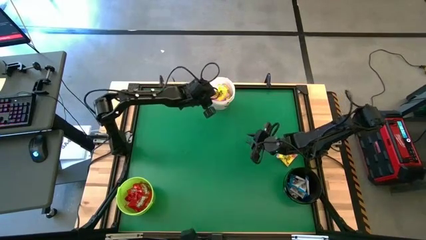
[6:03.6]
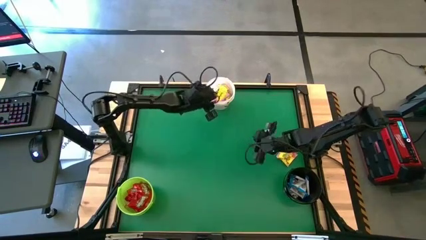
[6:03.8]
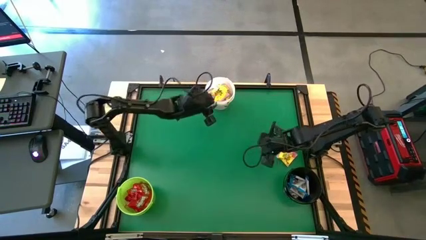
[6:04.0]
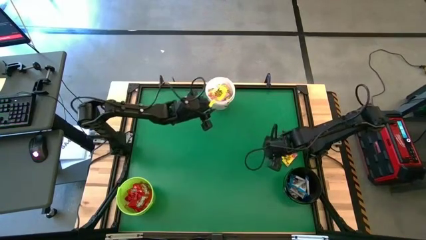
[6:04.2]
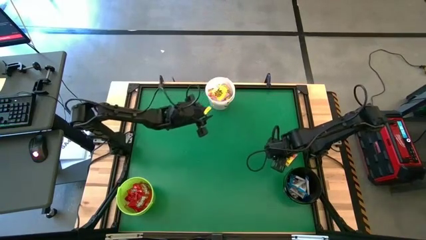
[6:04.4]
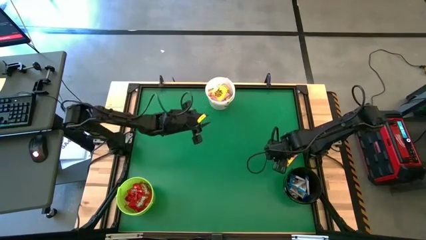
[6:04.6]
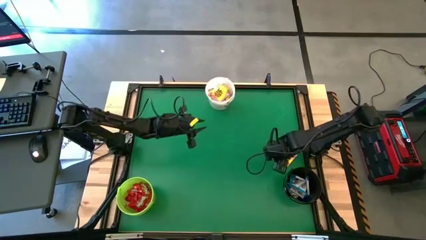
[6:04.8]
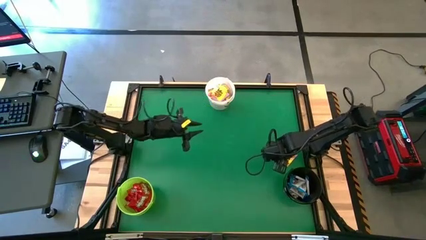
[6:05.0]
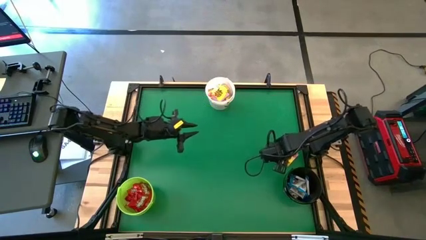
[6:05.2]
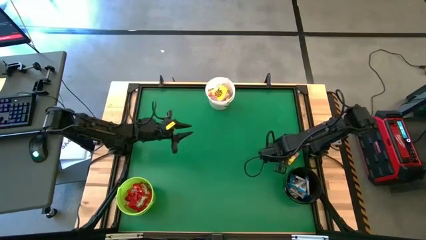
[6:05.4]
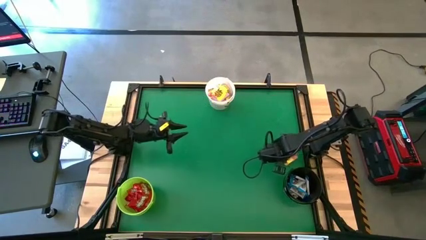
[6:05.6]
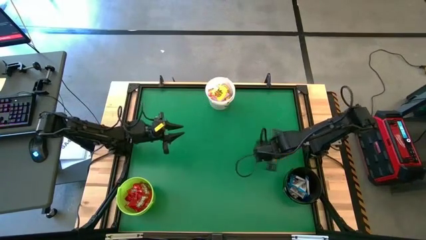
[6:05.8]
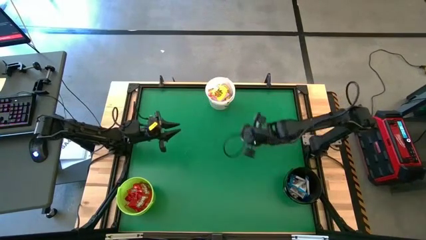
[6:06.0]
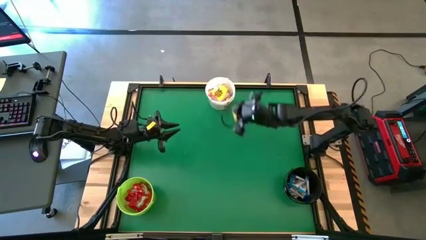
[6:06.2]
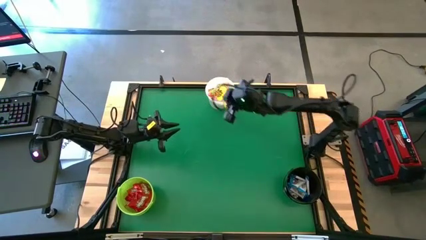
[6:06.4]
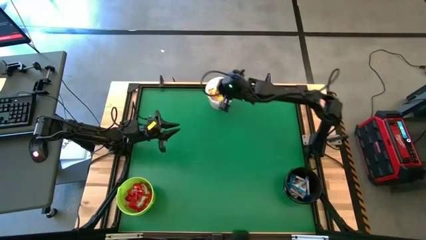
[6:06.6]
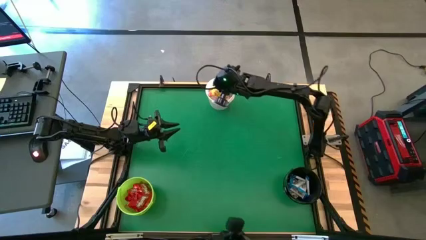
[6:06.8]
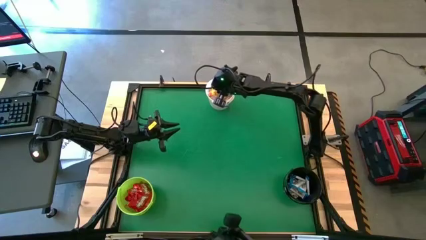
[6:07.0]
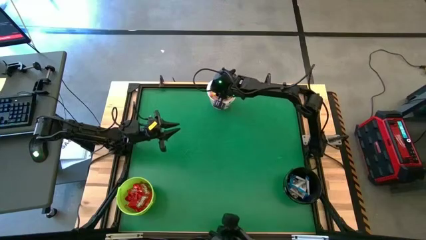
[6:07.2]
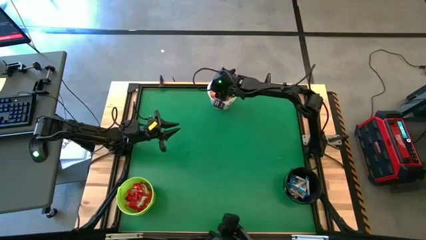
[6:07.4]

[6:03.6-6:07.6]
Task: Sort candy by brand, put in halloween buckets
Put the yellow candy into the white bucket

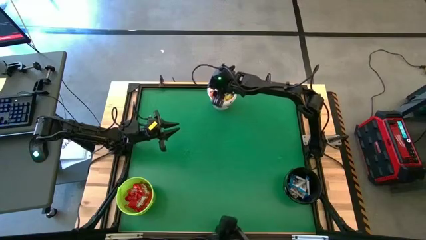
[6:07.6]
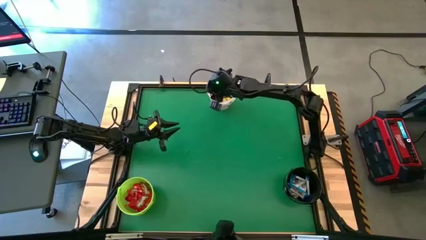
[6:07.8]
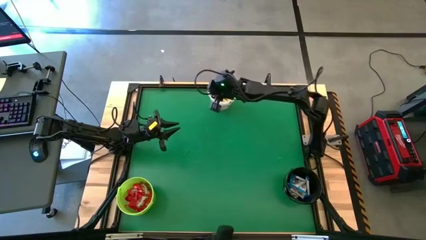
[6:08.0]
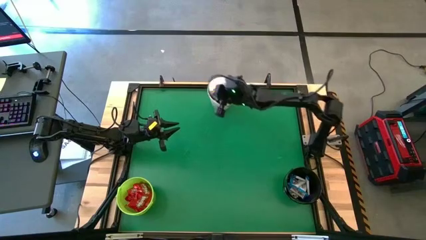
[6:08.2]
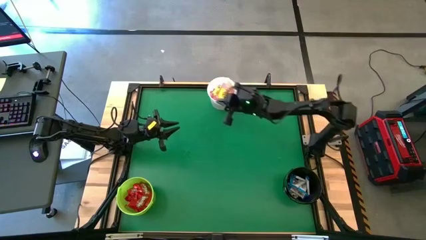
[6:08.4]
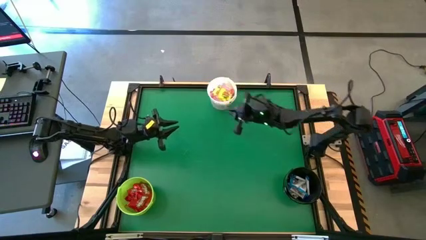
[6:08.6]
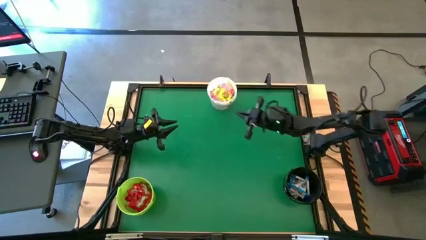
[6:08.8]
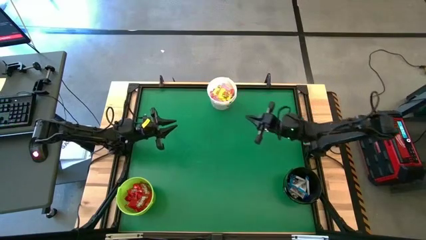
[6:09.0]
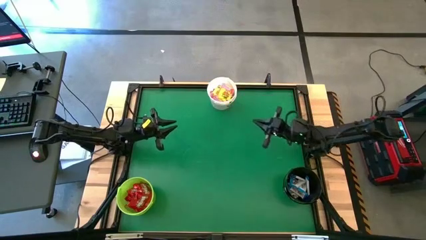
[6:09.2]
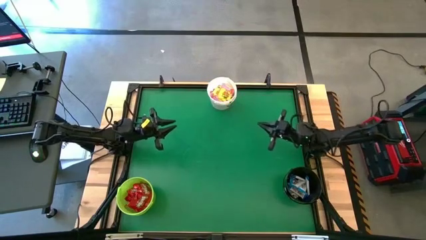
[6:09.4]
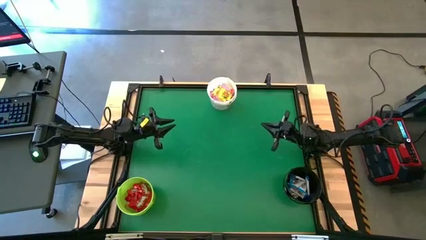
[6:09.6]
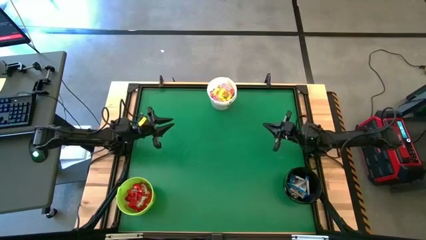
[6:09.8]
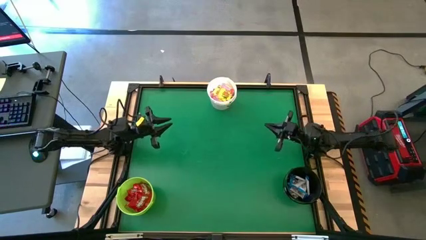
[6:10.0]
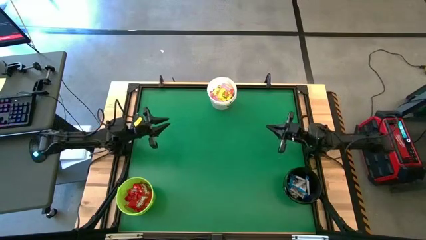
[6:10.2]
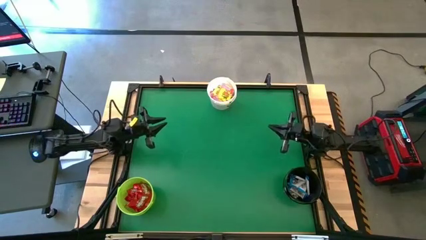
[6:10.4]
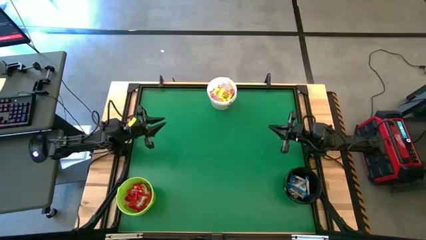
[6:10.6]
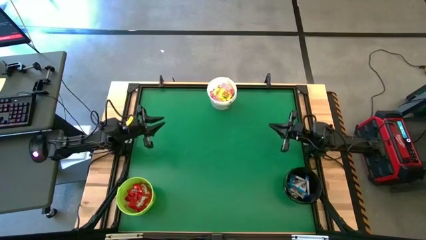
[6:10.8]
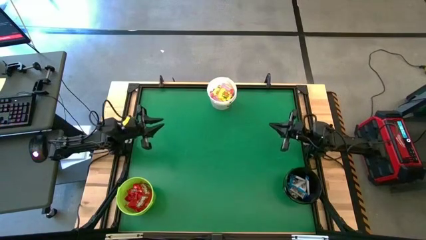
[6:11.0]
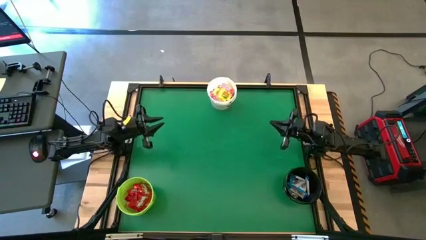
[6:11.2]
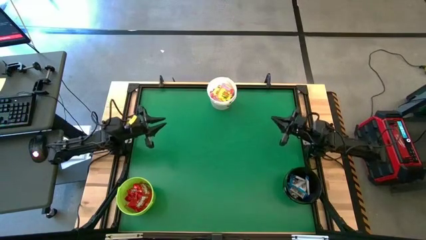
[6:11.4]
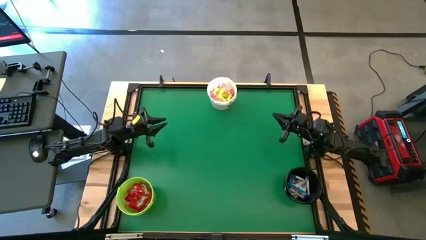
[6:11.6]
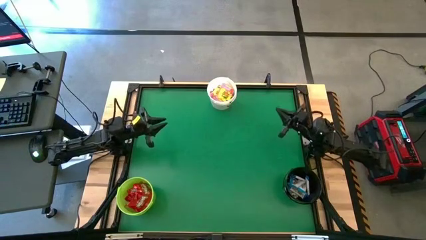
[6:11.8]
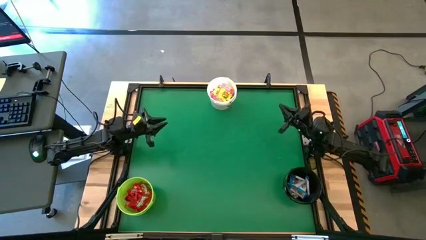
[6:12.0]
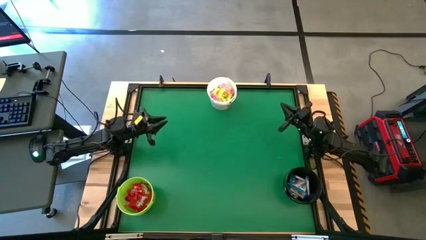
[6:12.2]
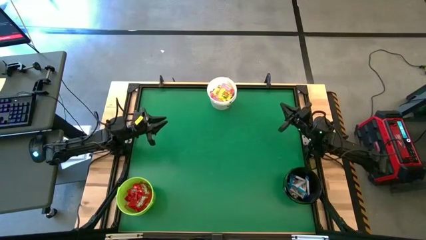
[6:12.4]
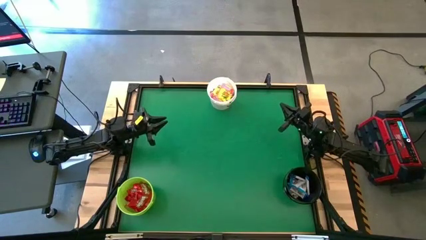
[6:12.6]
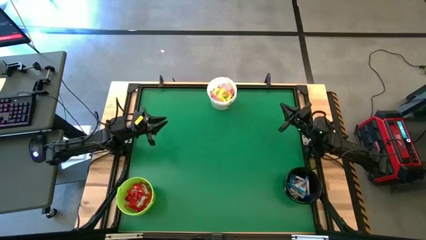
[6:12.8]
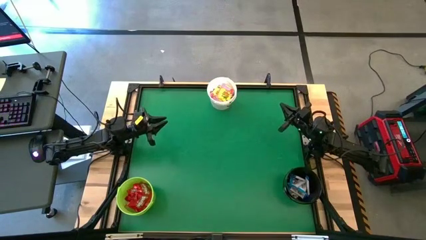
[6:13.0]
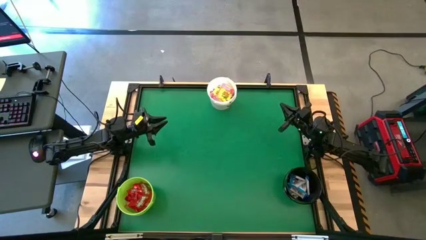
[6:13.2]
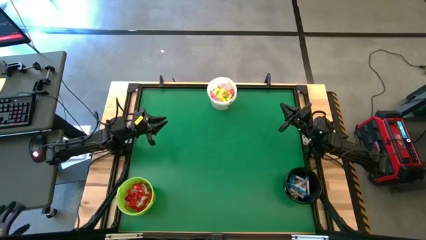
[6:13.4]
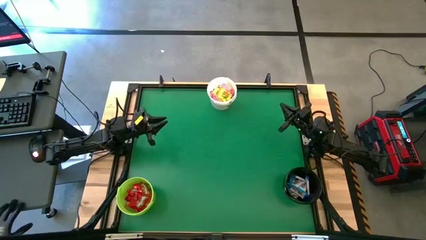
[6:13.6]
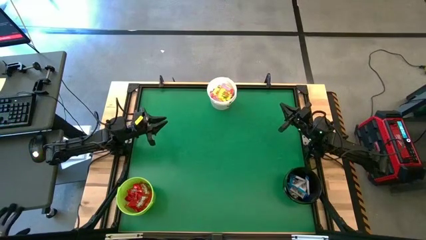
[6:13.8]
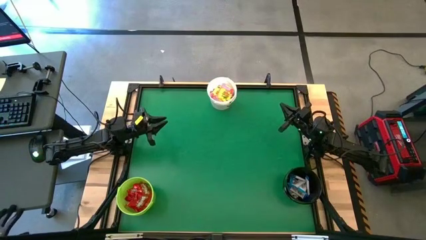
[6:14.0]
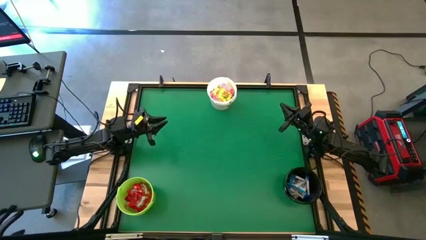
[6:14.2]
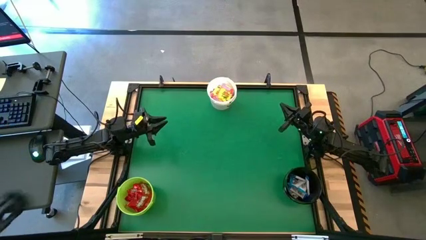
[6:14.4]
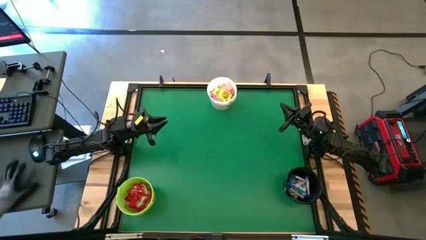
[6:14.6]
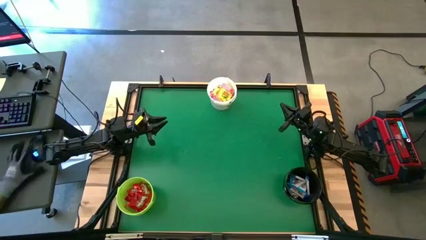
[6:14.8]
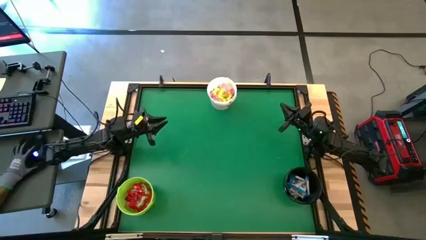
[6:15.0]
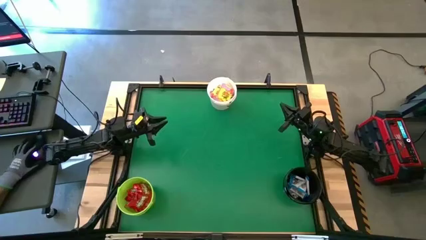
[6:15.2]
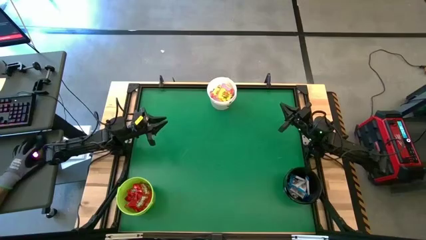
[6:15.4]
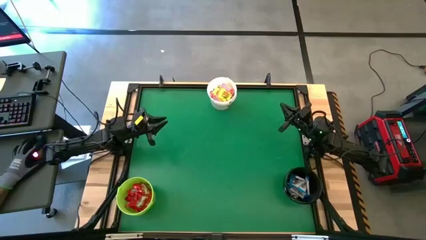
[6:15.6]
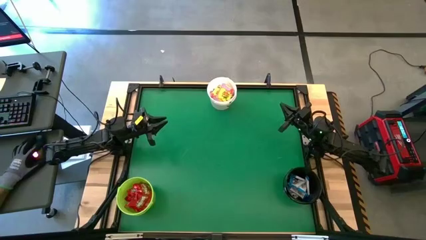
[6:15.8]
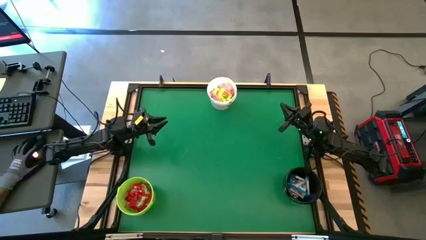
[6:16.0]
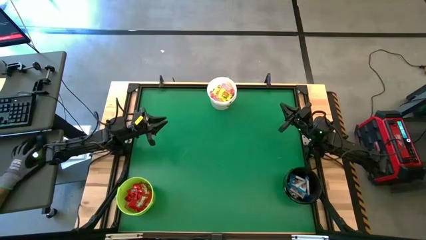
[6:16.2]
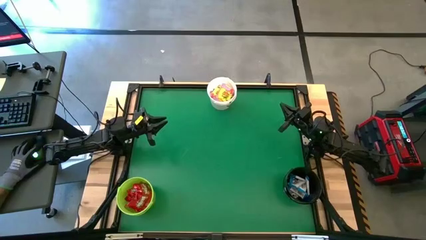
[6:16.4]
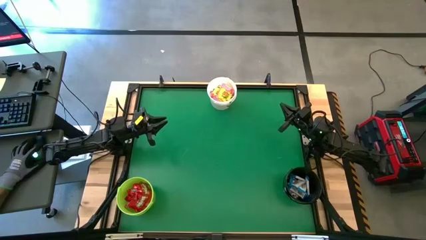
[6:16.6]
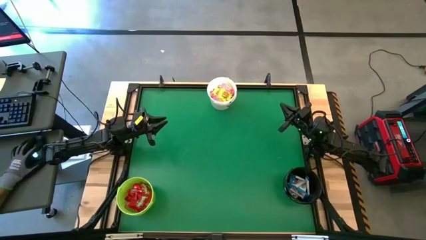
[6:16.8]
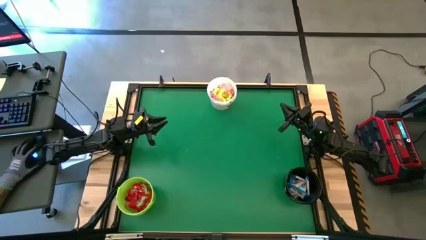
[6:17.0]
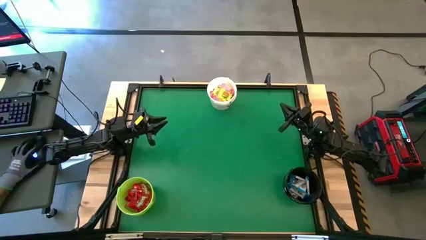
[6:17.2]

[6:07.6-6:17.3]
Return to home position

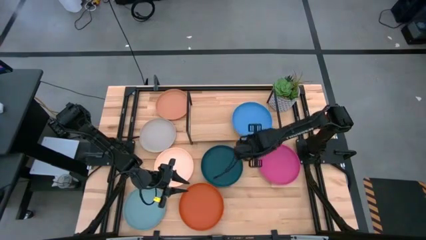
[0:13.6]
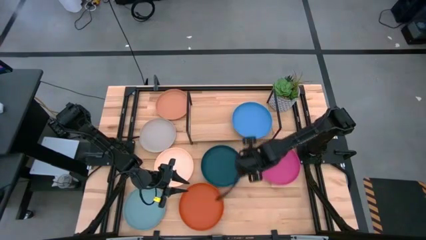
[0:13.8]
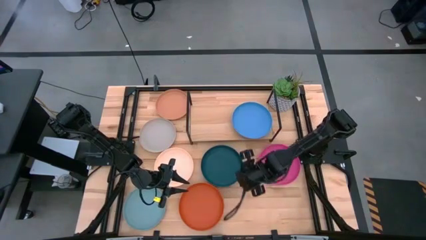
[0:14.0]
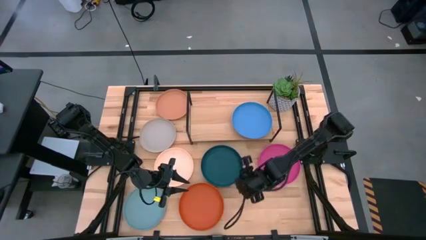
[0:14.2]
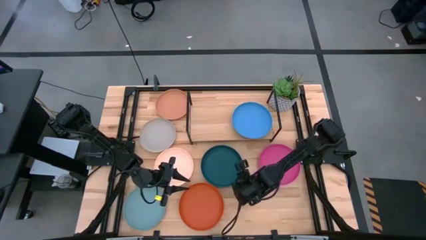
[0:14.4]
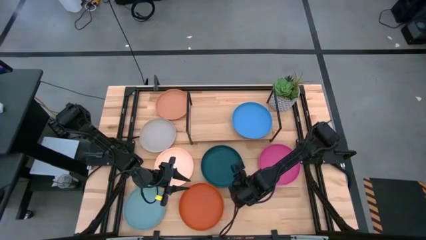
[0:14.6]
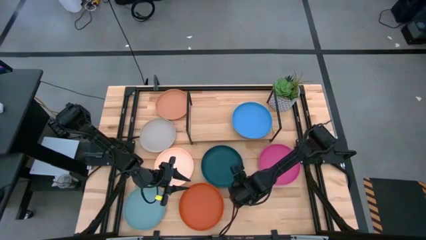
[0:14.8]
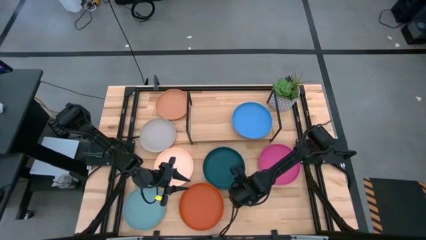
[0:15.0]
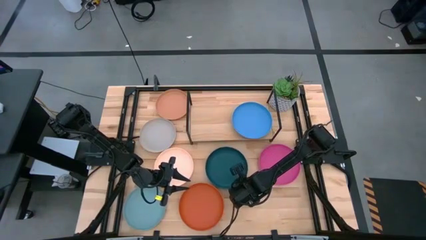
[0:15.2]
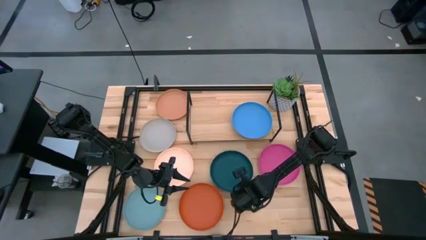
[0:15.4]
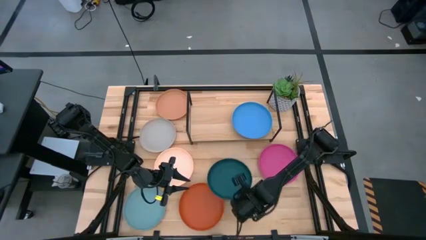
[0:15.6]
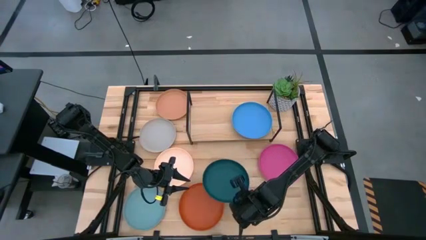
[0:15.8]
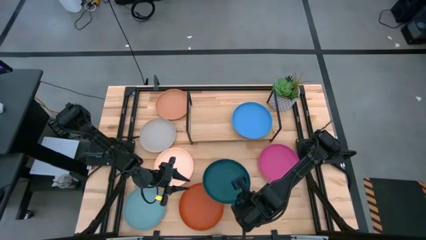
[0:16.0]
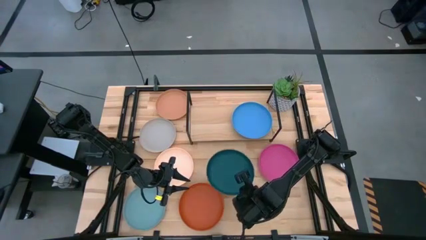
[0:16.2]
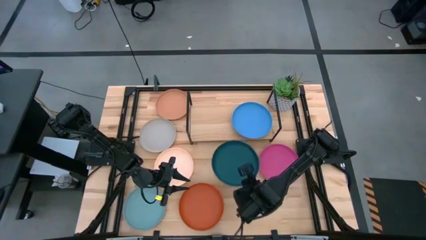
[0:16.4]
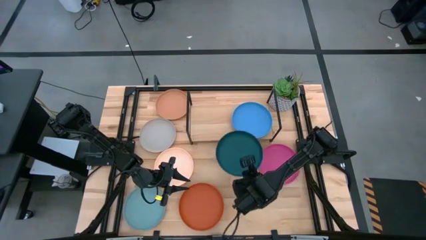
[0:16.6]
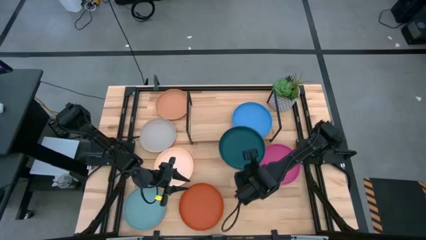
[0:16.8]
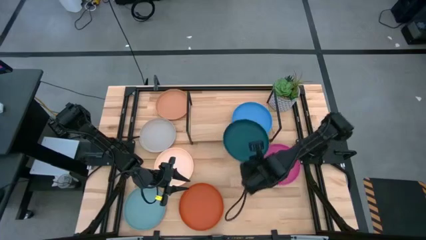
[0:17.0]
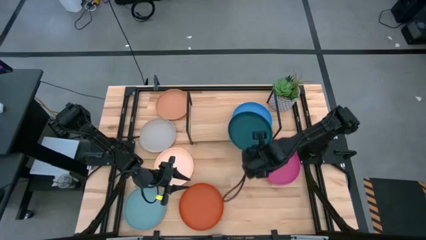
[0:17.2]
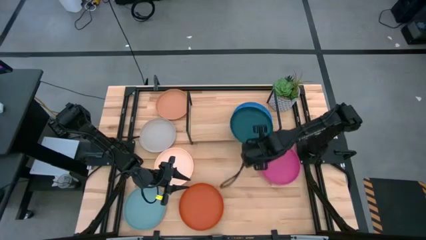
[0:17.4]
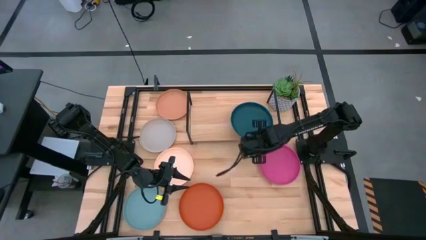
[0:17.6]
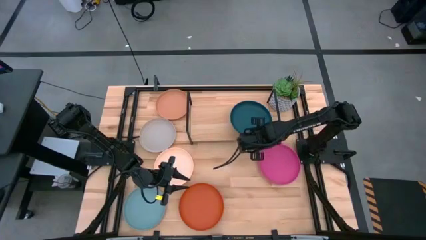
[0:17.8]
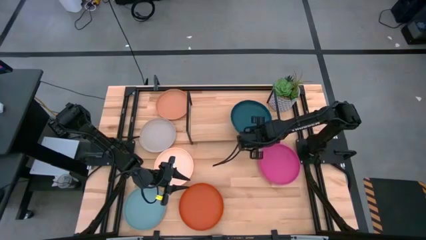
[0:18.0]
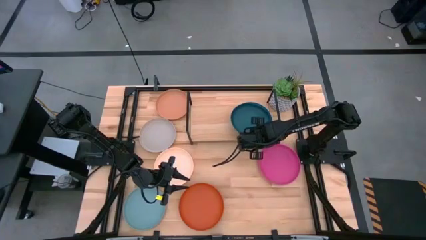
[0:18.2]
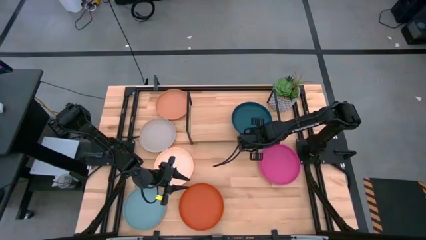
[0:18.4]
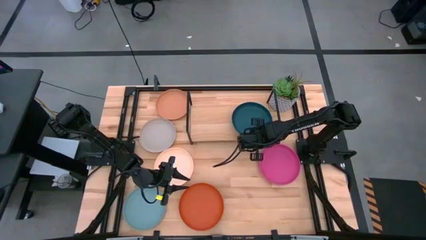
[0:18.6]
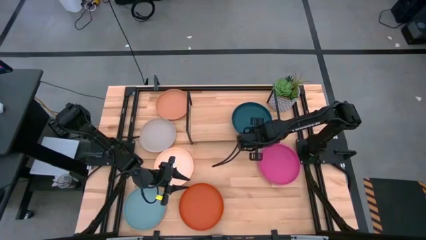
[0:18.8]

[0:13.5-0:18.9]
Task: Place and stack plates onto a shelf
Stack the green plate on top of the blue plate on the shelf
